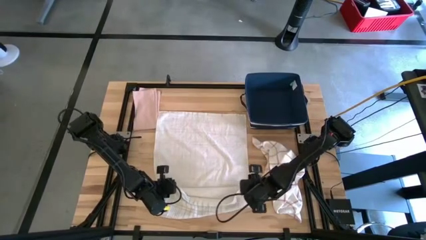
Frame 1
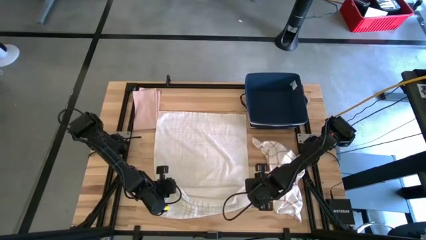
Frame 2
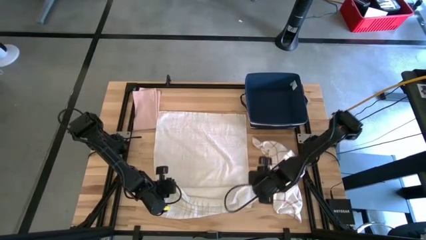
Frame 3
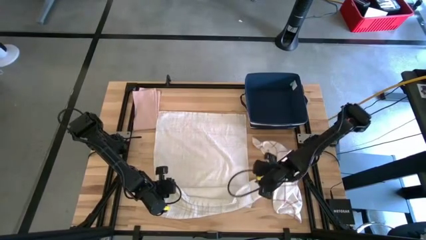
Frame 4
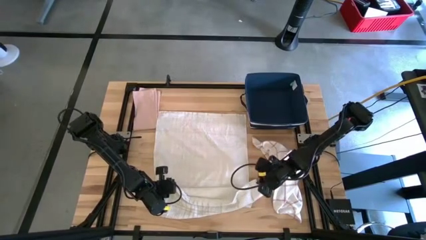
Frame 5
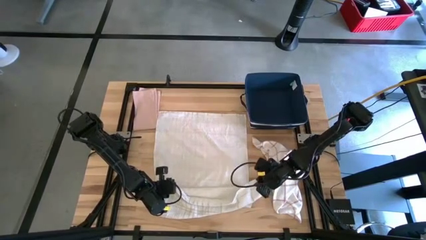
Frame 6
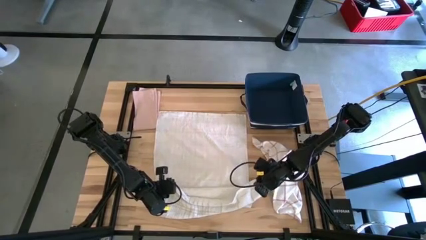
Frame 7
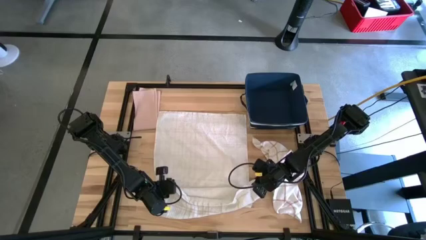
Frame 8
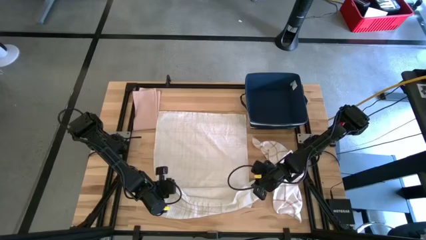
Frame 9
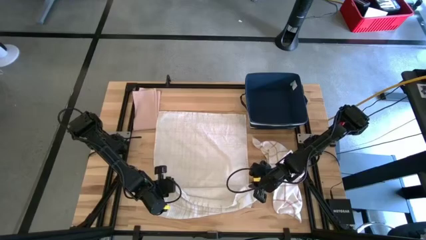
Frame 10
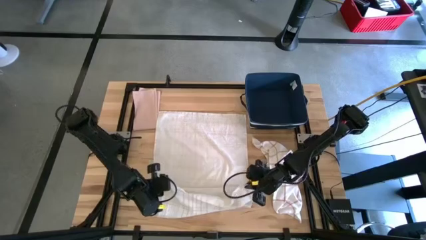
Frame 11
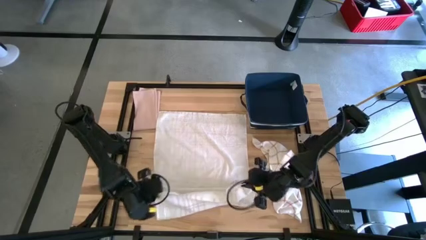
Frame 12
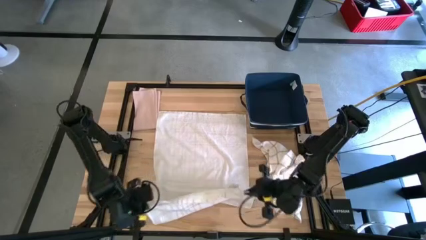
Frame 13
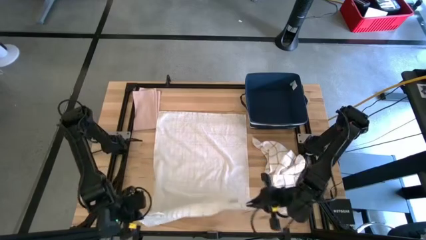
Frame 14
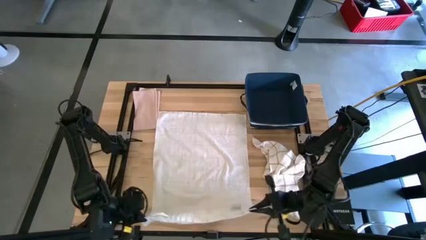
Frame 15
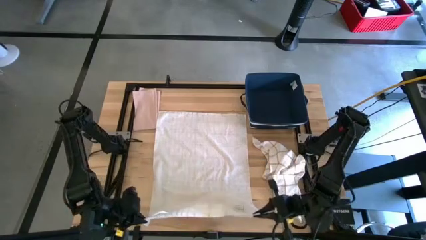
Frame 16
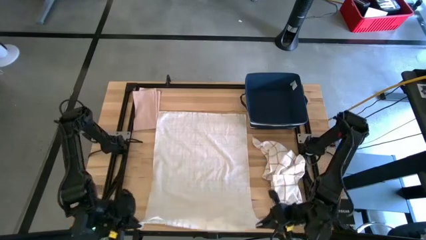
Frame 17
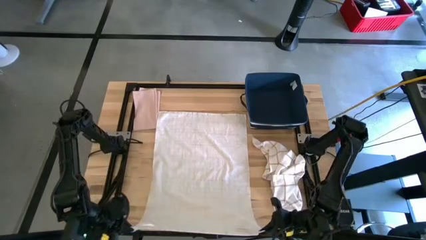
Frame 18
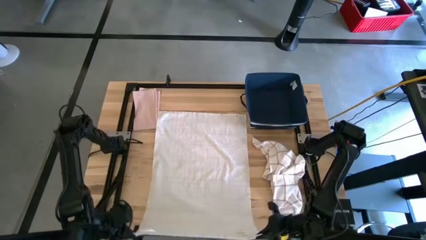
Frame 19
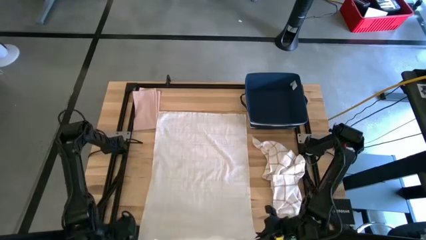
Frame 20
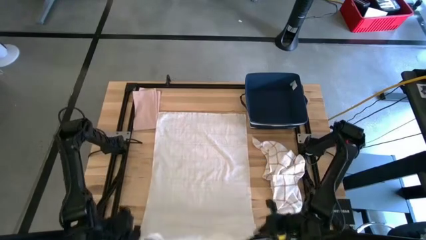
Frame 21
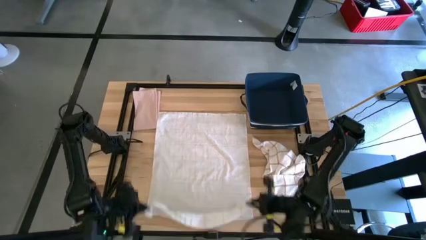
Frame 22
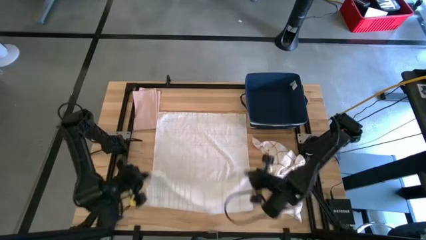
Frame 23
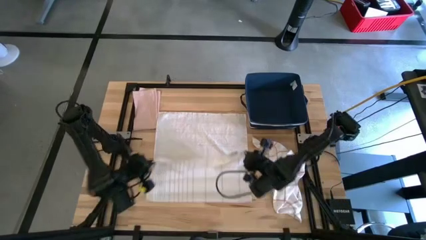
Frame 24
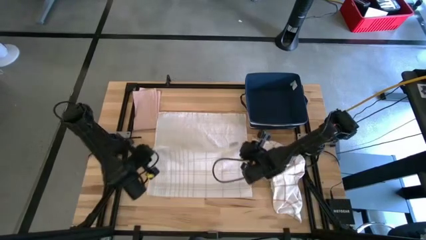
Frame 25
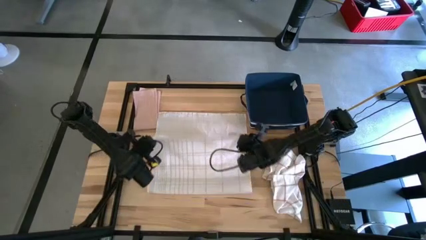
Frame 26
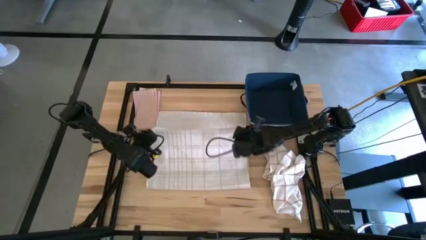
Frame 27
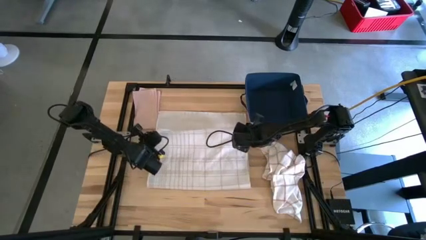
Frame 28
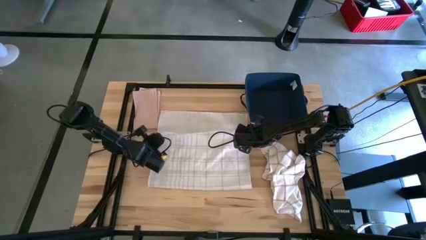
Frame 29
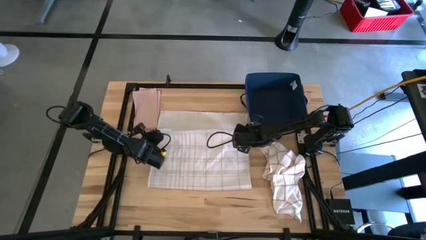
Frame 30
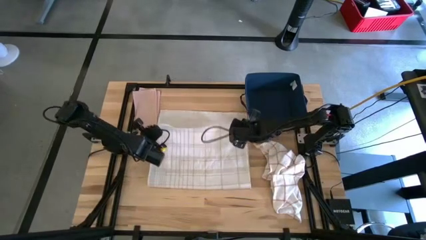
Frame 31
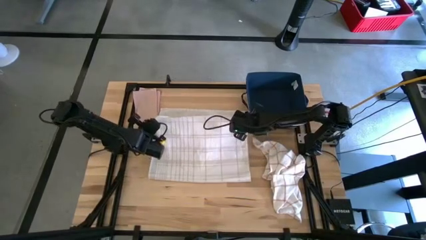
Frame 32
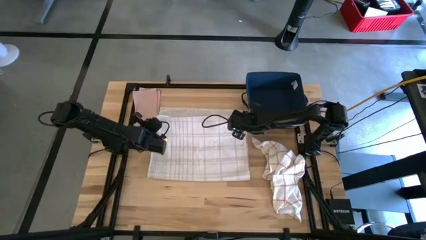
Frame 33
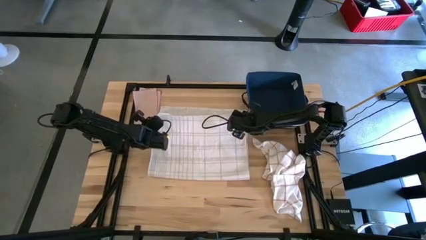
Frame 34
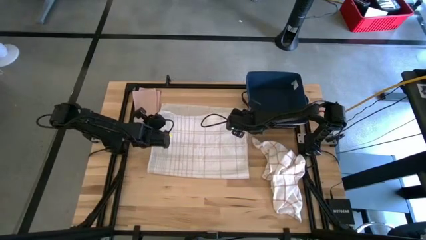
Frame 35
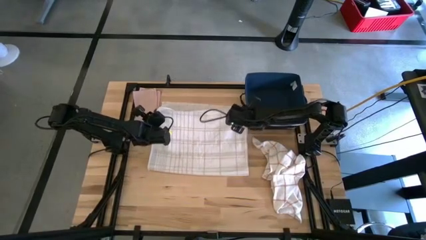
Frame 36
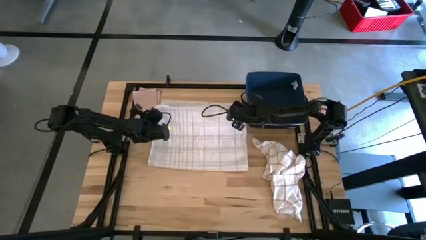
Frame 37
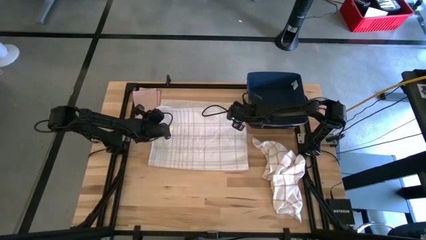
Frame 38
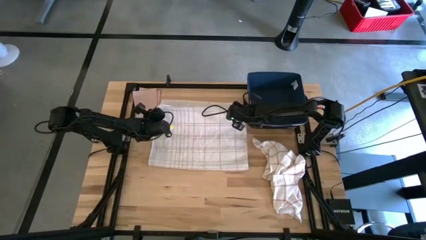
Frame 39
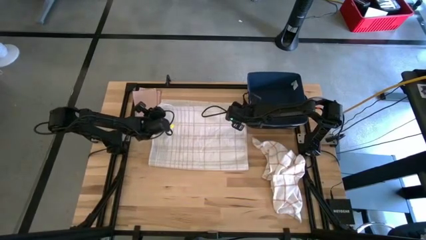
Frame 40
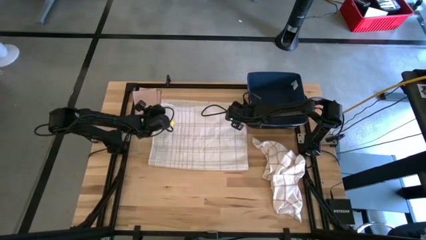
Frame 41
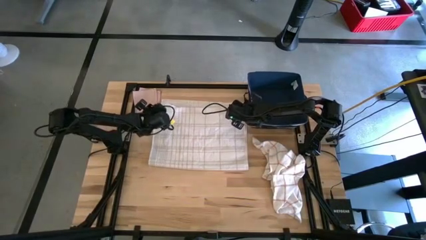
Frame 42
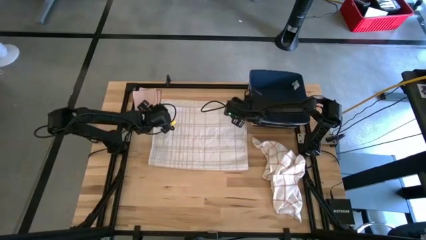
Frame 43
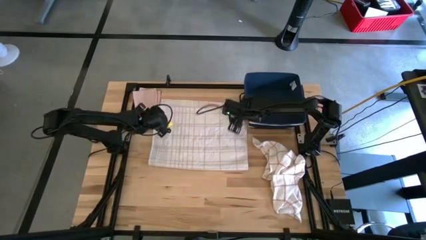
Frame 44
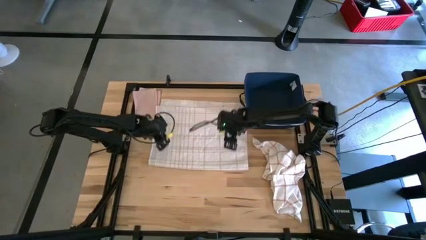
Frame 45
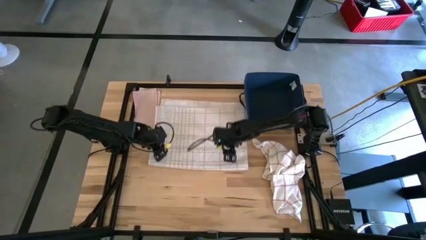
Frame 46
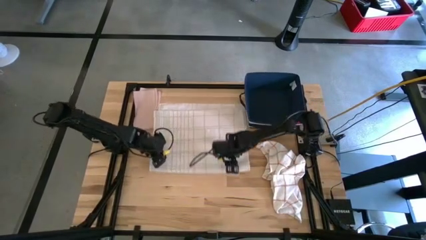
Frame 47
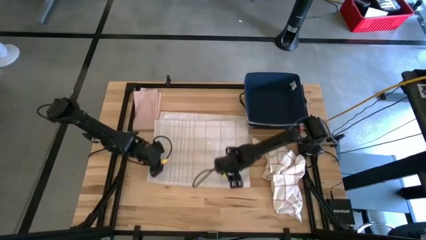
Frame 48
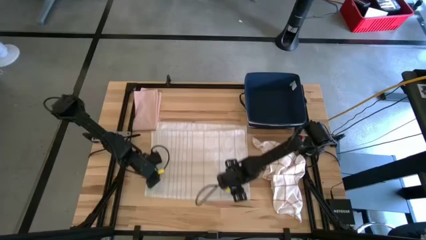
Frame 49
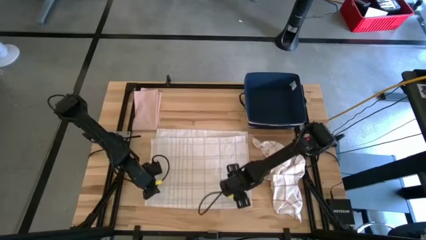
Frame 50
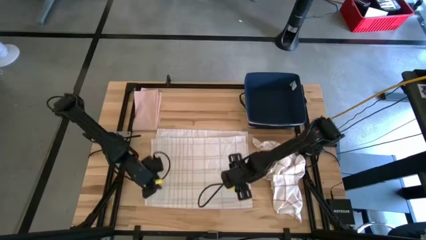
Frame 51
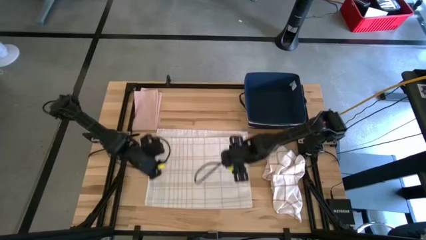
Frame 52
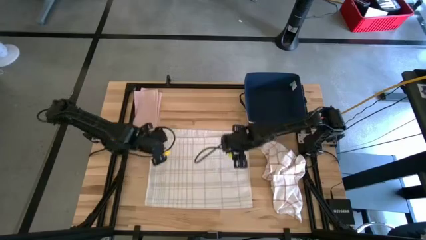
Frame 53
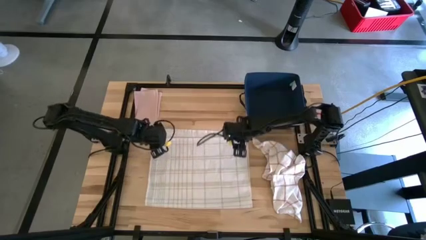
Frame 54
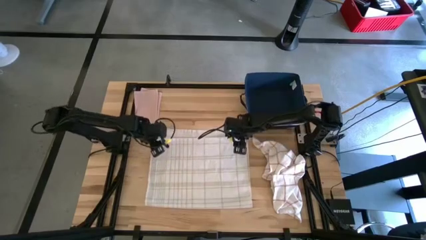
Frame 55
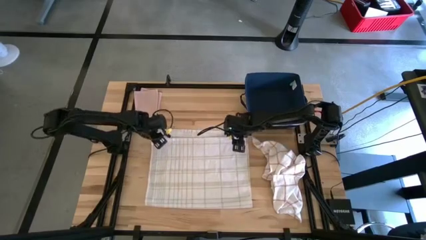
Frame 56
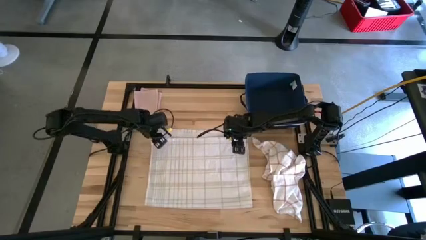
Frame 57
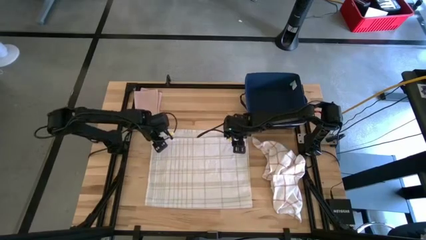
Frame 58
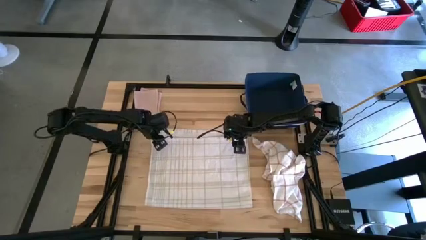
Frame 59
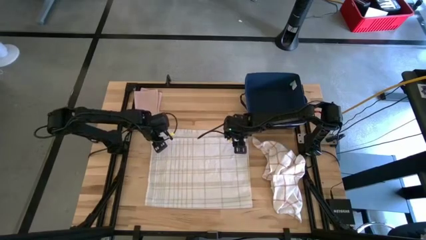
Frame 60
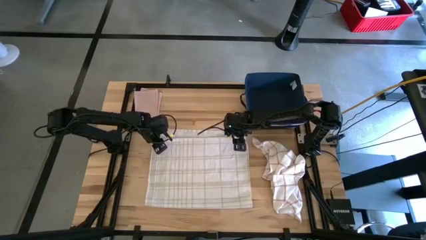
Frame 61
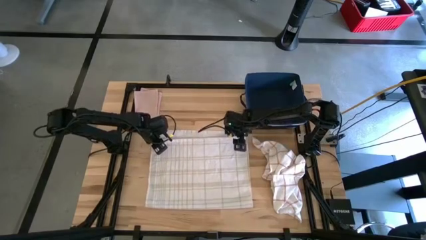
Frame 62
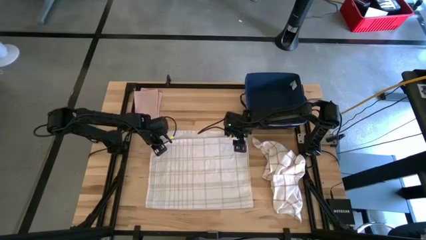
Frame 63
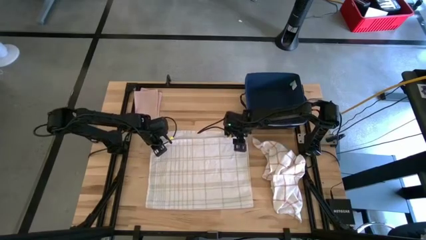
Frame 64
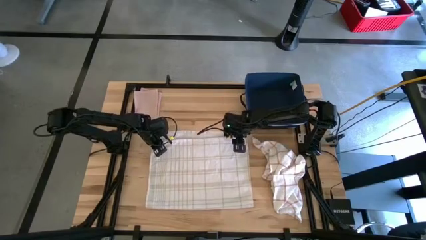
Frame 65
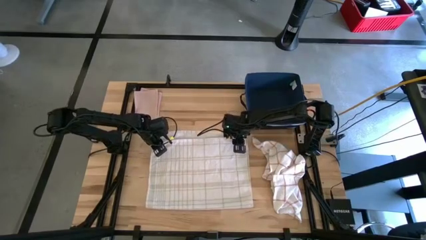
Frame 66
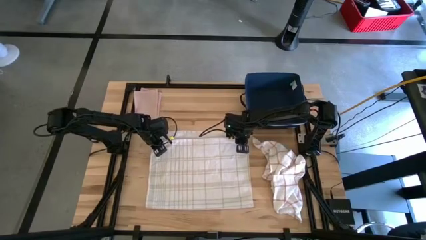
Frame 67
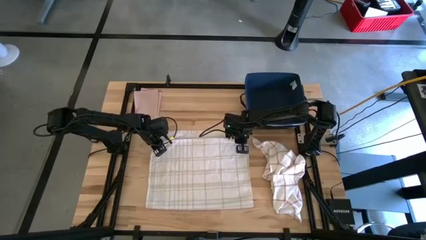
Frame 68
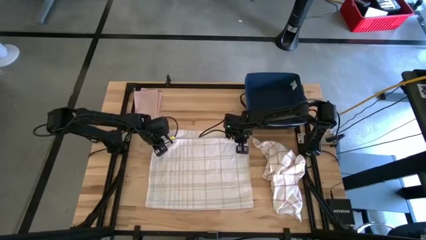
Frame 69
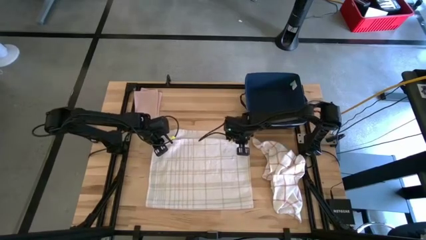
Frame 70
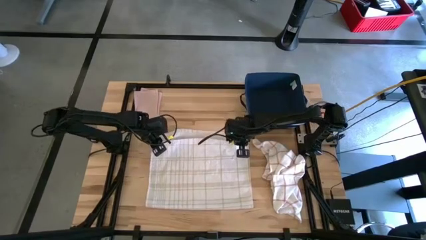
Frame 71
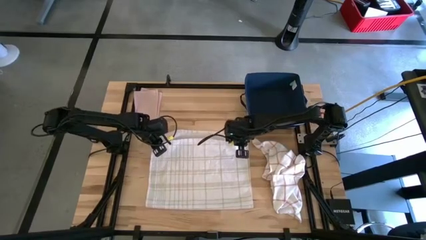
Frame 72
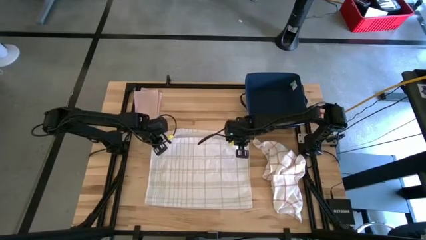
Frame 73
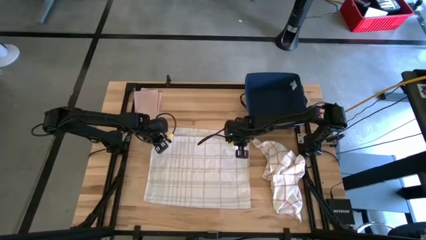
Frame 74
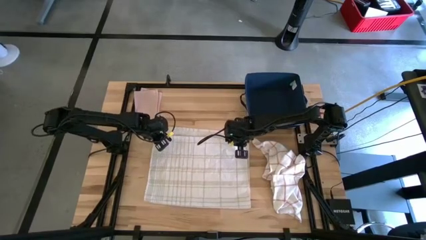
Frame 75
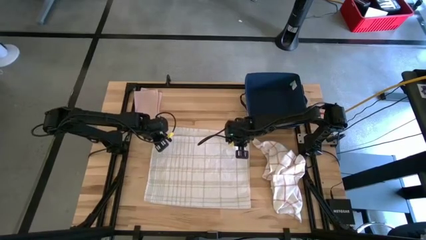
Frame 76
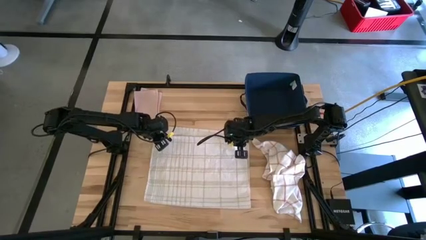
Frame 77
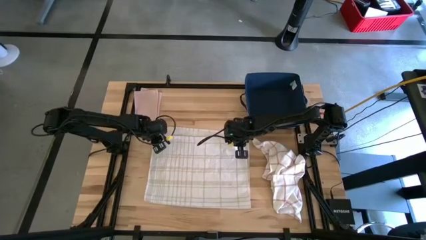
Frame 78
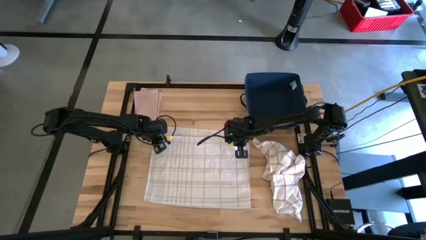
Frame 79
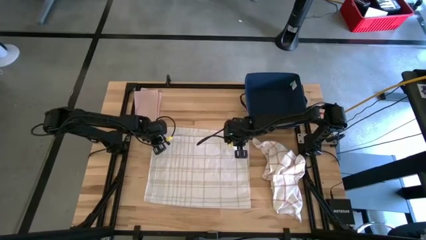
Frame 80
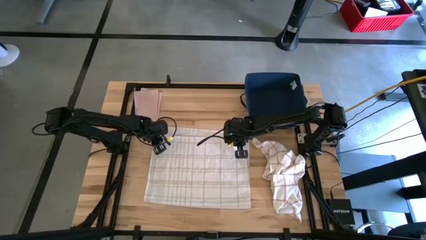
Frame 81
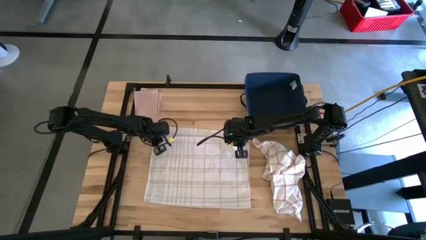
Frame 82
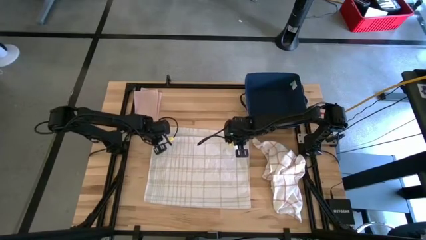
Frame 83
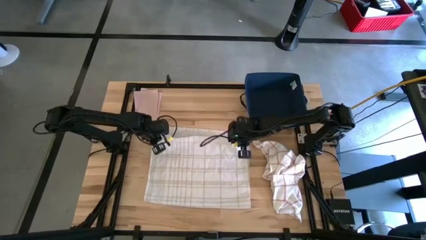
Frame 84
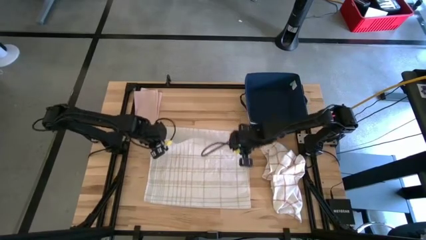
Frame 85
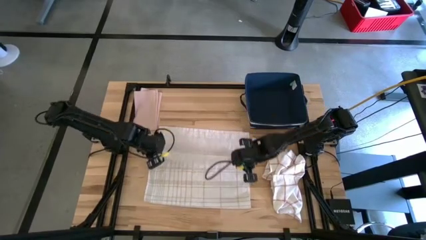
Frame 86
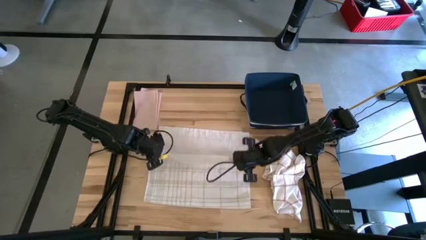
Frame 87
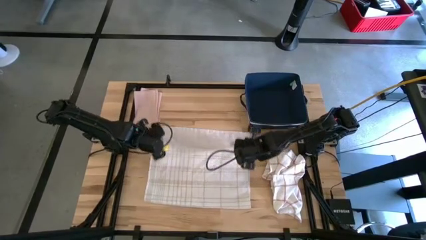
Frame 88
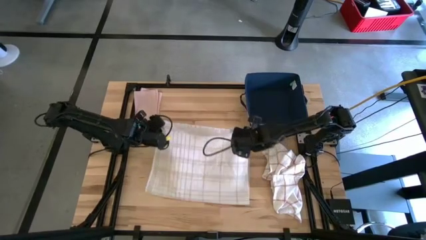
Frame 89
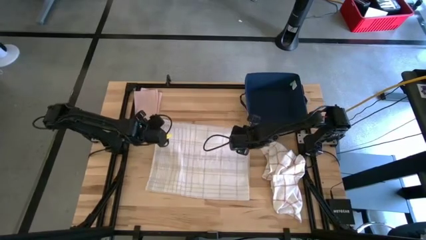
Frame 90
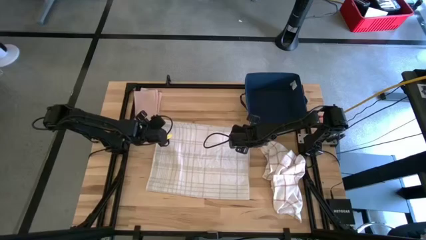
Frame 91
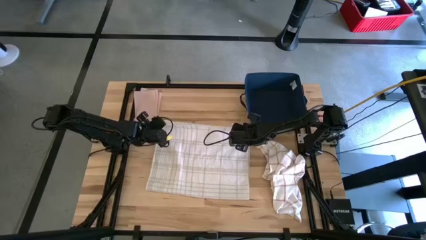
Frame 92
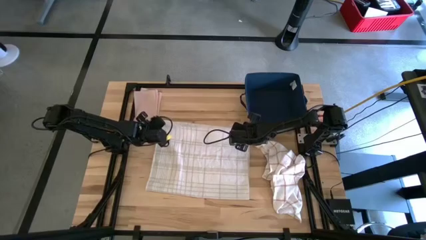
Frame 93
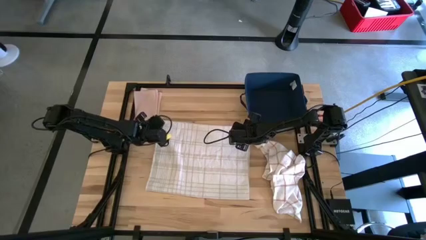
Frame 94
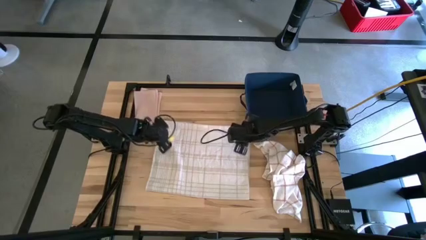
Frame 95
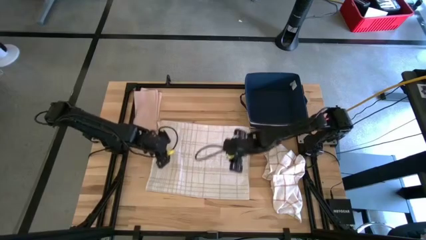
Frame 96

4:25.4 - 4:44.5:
Task: Fold towel
Fold the white patterned towel
